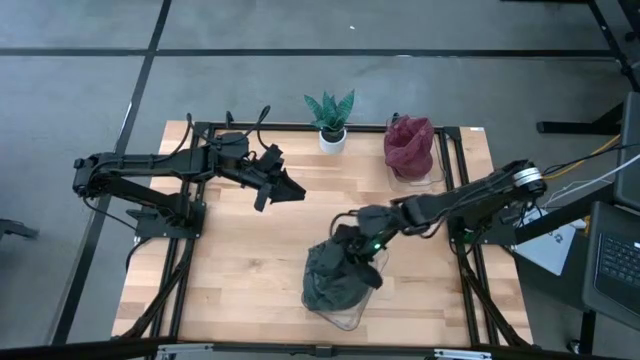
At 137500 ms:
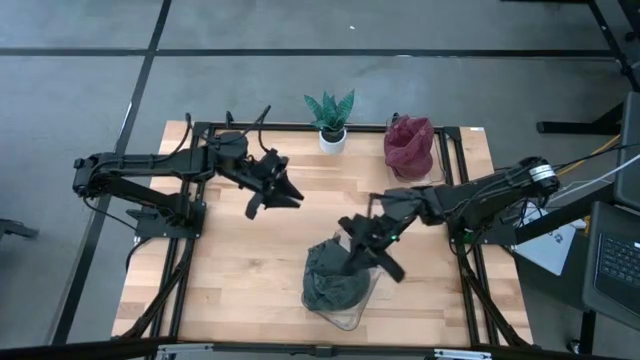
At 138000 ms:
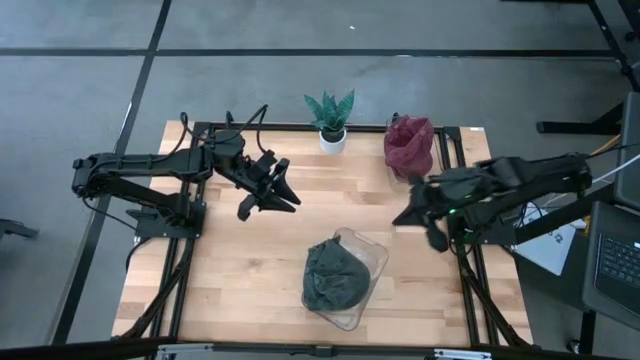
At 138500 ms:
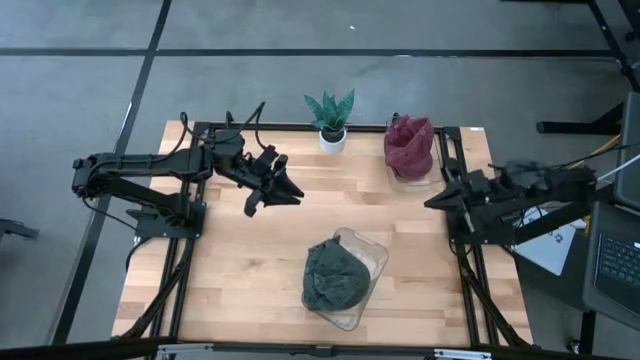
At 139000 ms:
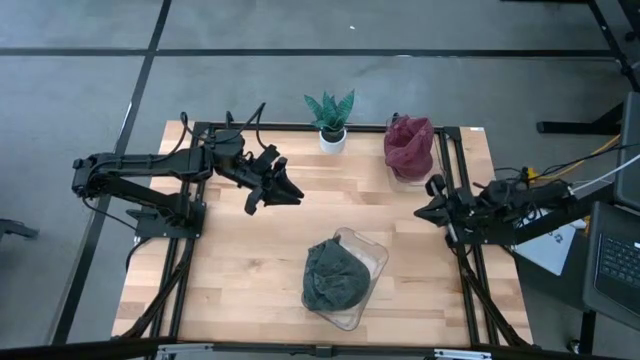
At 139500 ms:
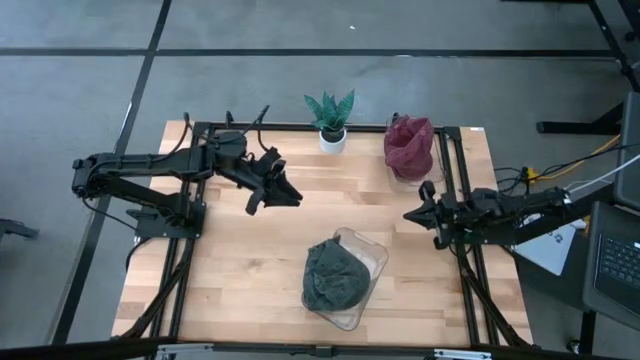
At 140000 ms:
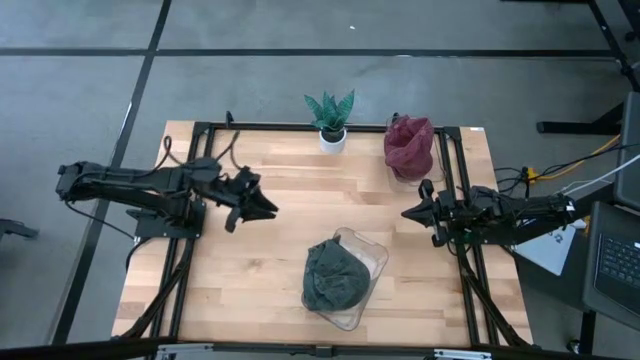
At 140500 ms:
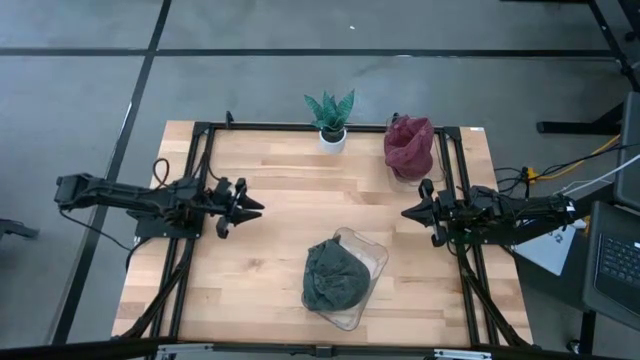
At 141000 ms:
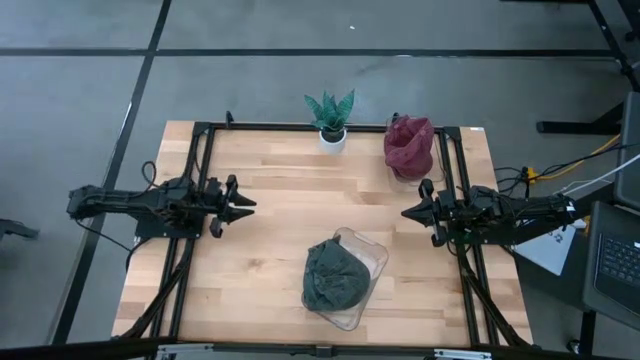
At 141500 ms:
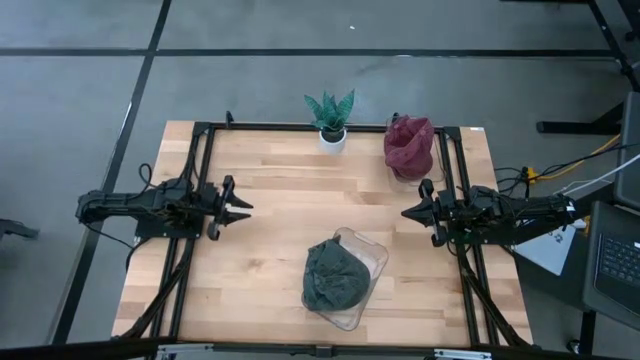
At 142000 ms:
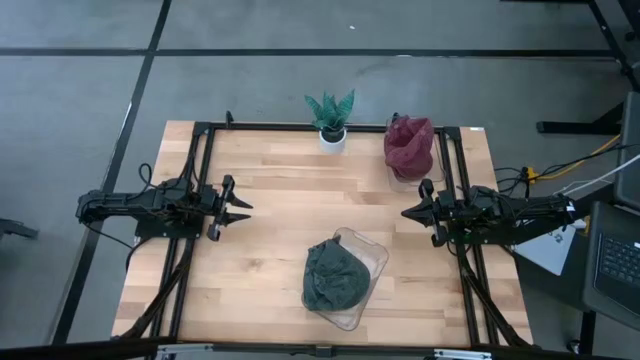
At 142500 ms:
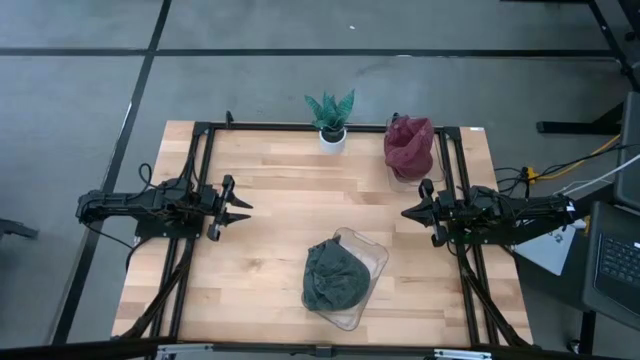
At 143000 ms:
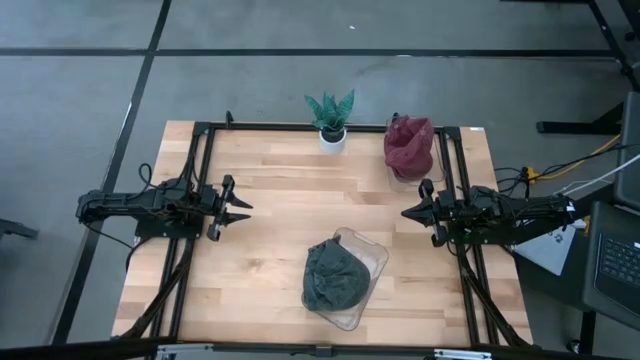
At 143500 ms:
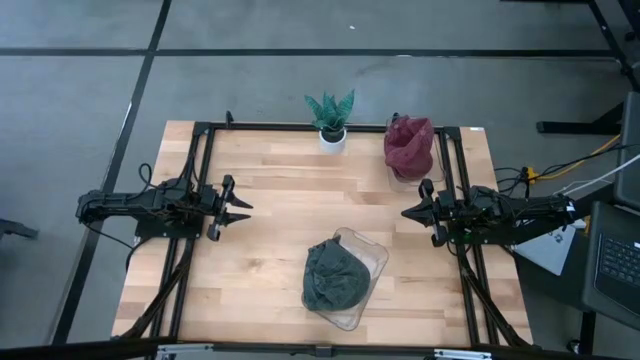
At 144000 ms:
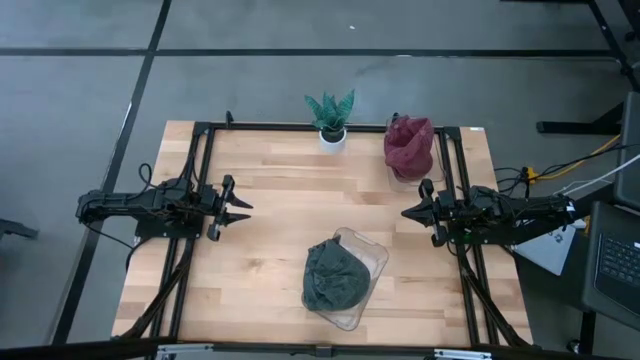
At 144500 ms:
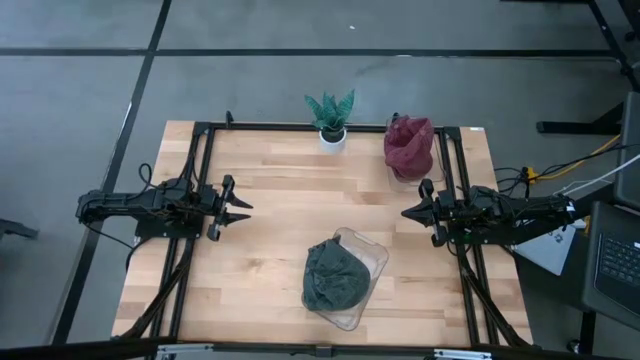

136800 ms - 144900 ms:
Task: Pick & Place hat
Return to Home Position

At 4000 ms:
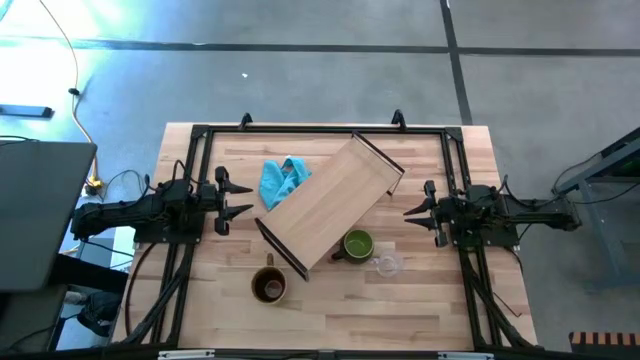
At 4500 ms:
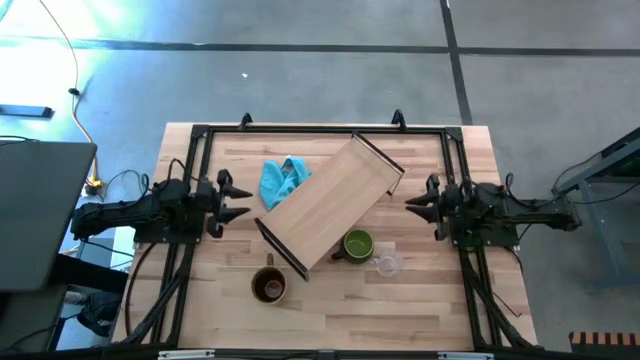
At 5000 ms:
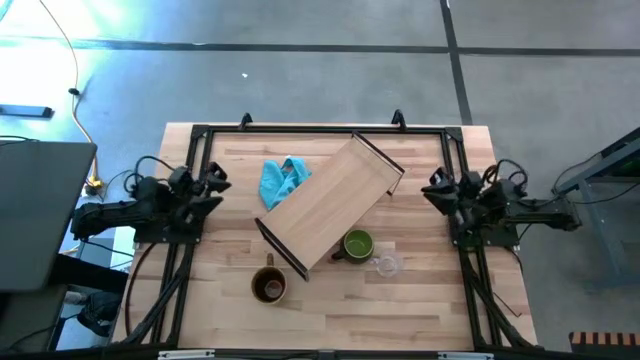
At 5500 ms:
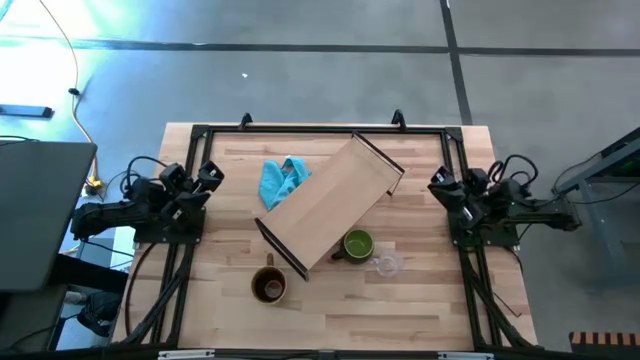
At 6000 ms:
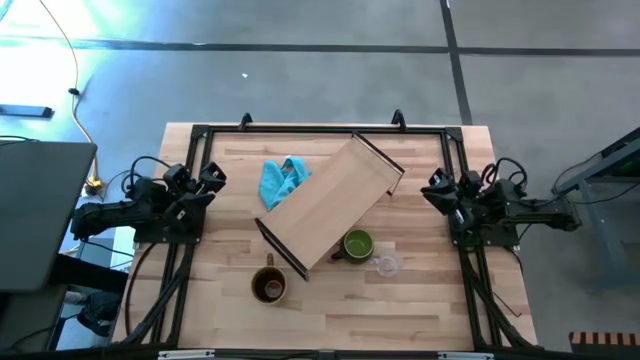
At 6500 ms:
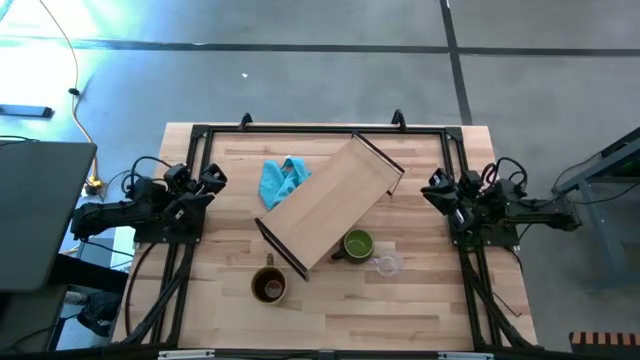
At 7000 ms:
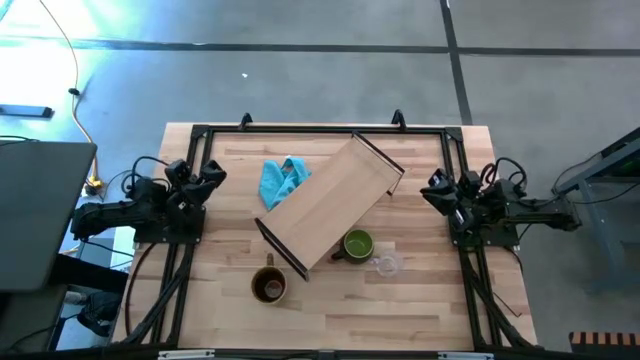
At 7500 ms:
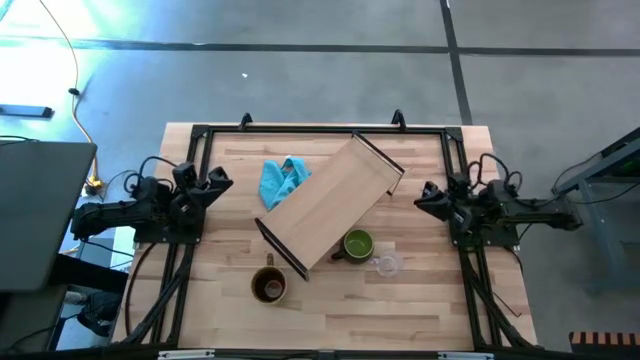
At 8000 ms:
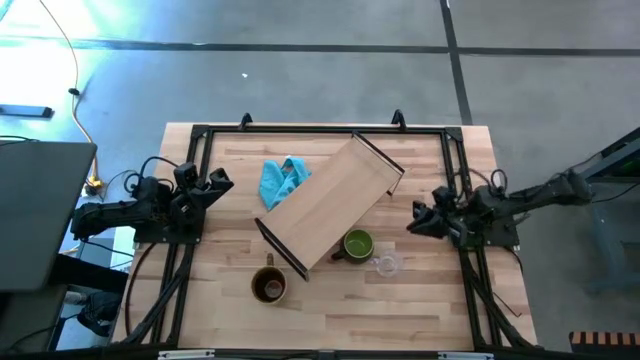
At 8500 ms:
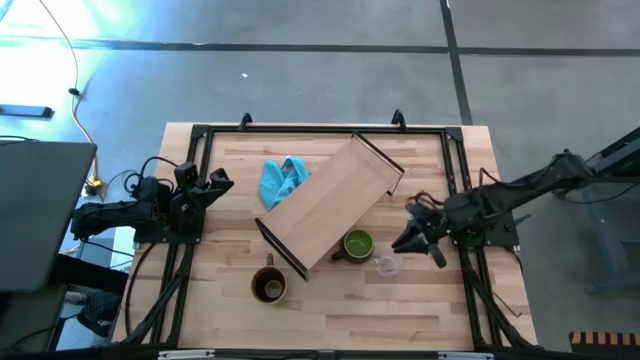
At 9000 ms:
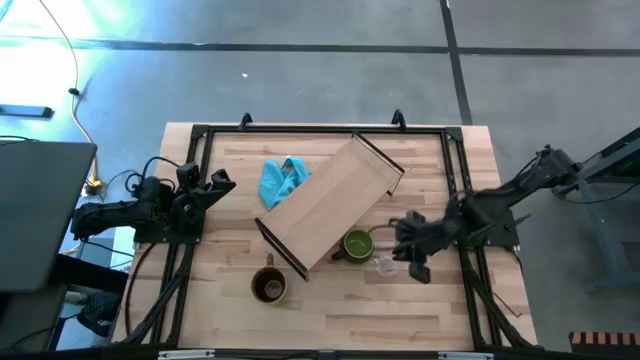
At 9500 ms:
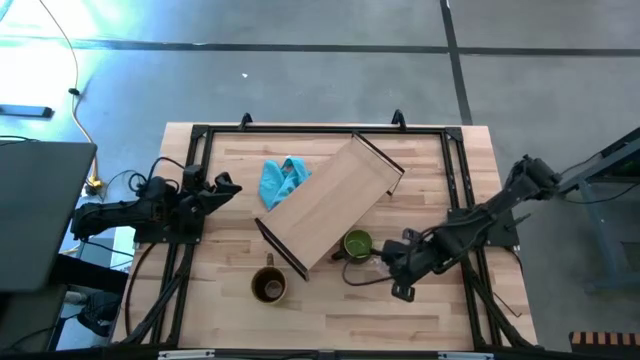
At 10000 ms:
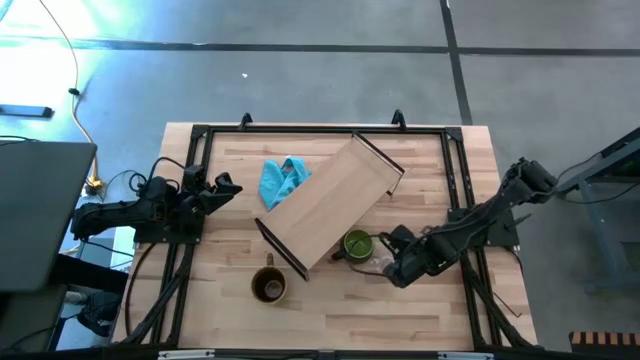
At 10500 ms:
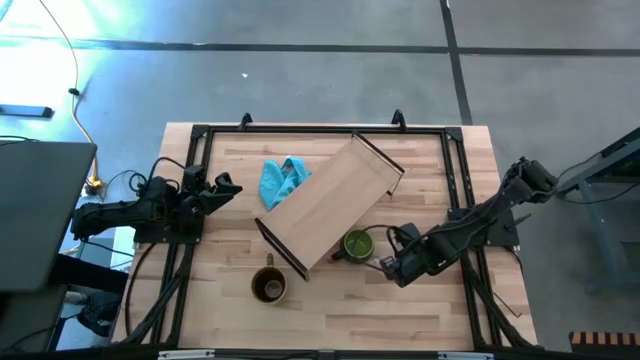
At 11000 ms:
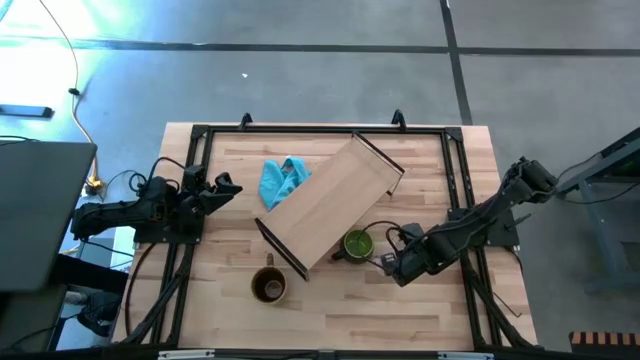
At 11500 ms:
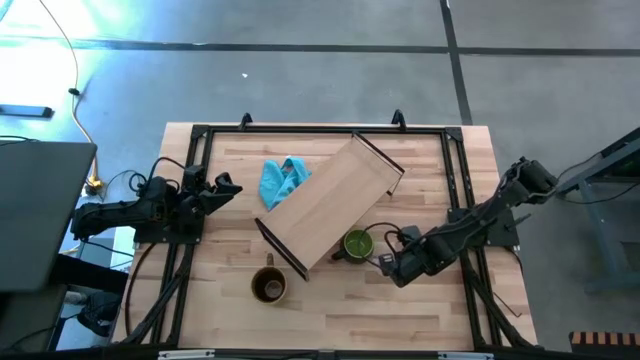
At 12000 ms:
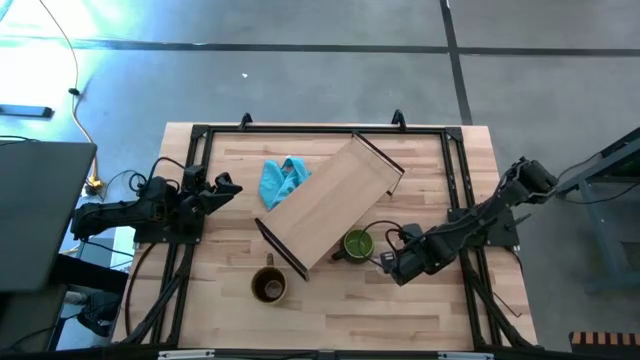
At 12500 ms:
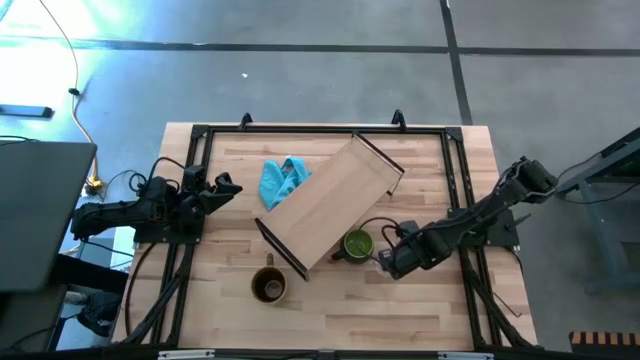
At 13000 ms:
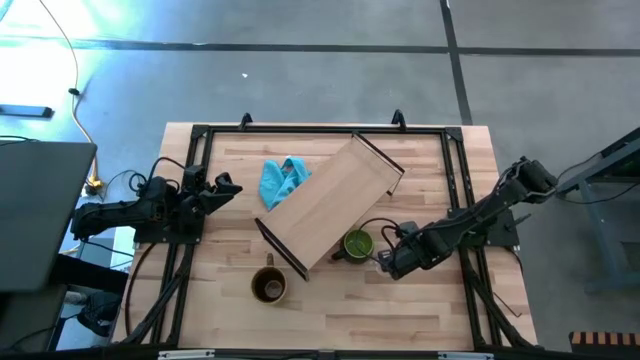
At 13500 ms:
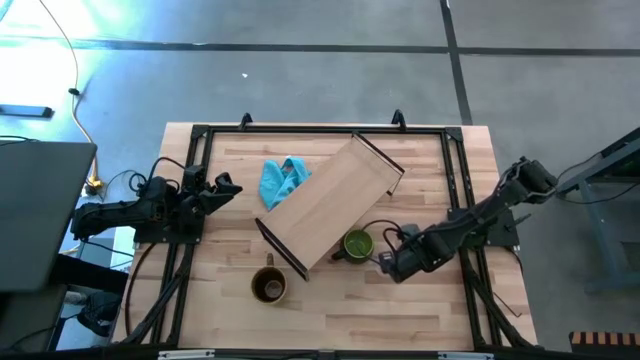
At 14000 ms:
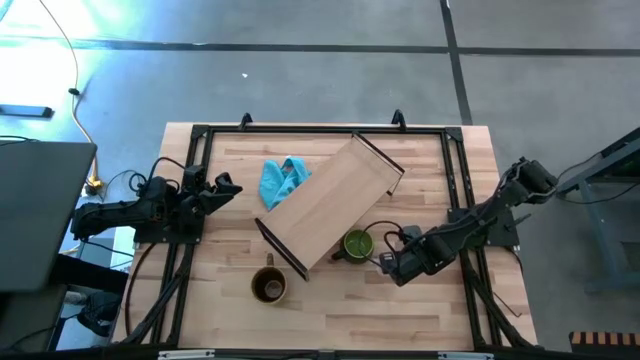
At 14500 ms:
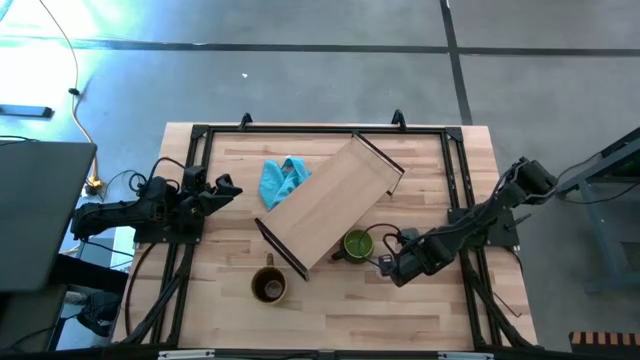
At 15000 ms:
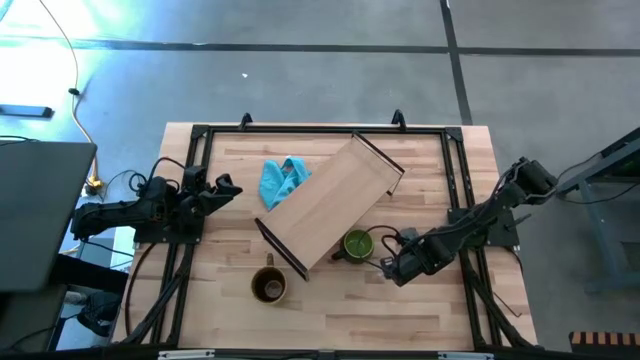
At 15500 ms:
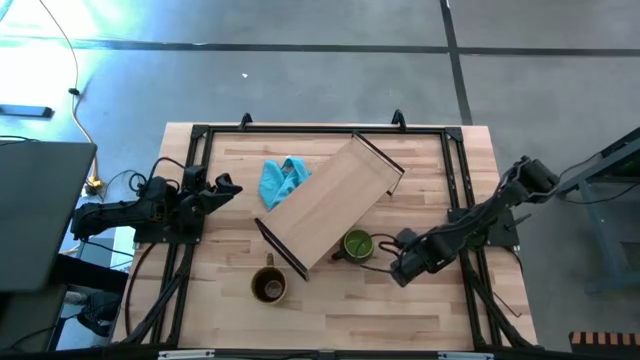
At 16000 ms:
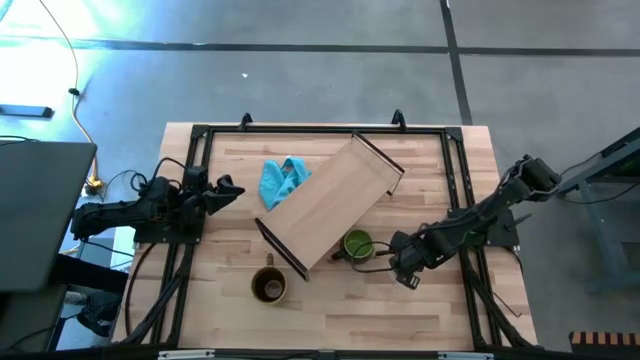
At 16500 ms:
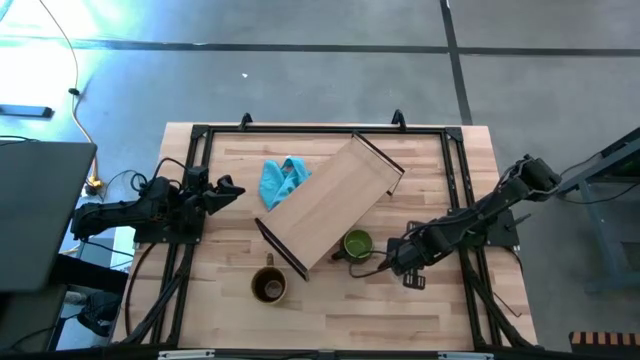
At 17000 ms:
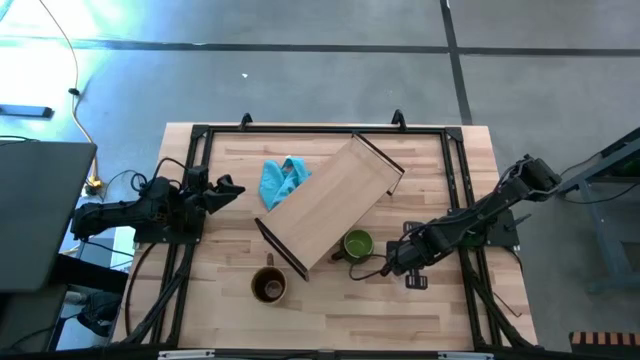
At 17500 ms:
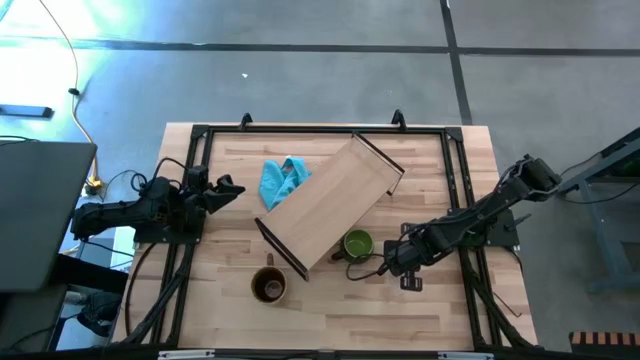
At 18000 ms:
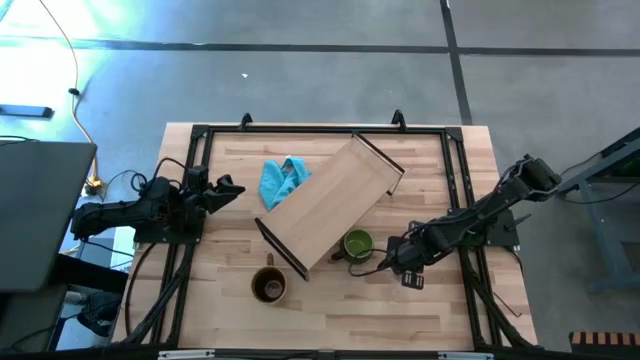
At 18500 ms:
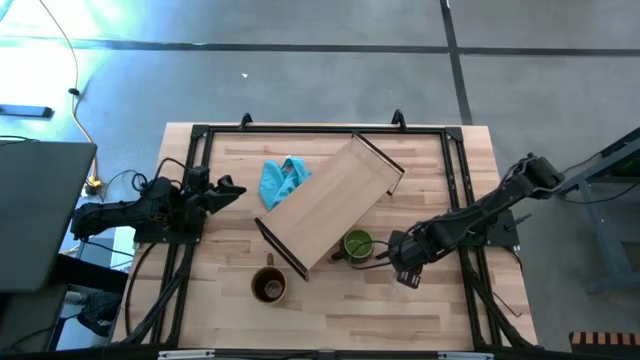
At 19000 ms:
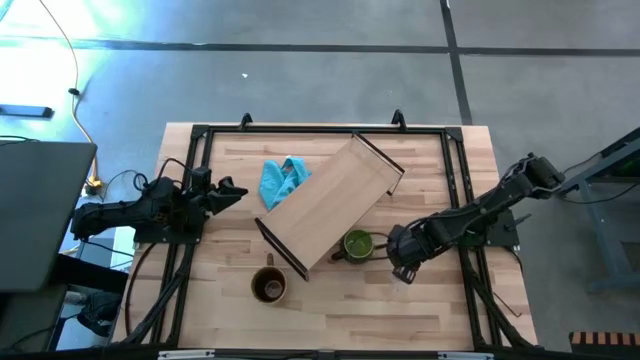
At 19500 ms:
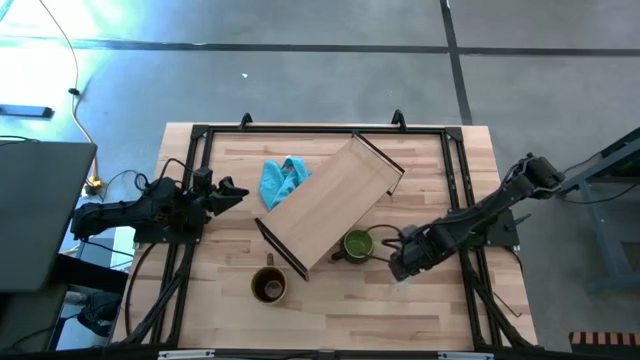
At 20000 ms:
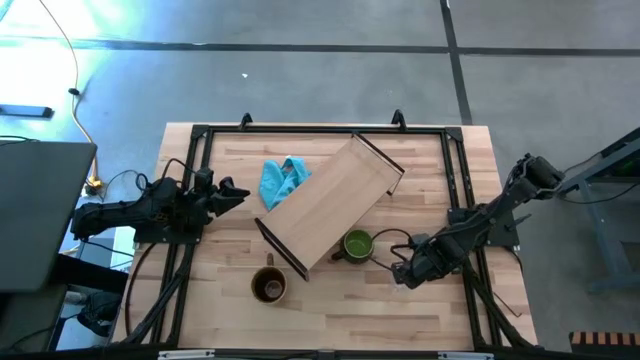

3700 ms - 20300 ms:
Task: Stack small to large cups/mugs on shelf
Put the transparent mug on the shelf
